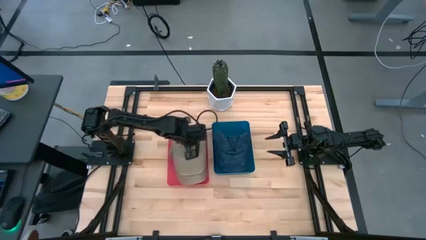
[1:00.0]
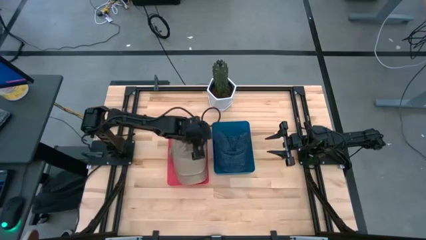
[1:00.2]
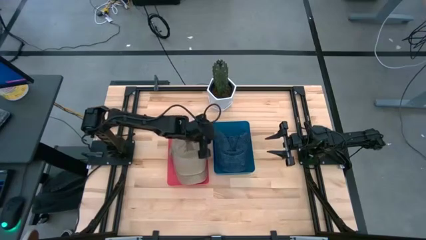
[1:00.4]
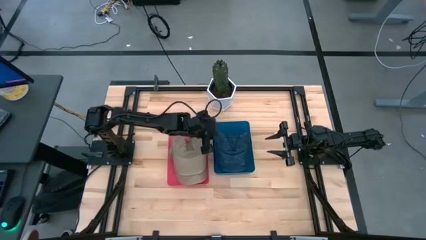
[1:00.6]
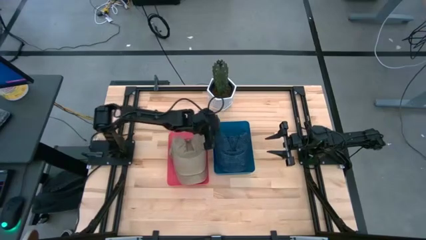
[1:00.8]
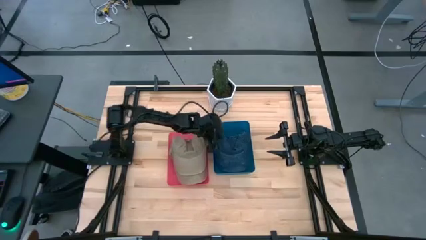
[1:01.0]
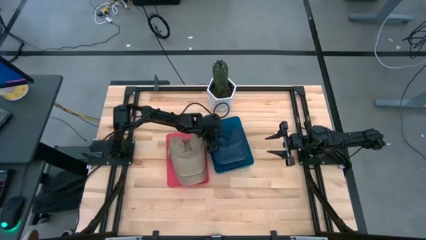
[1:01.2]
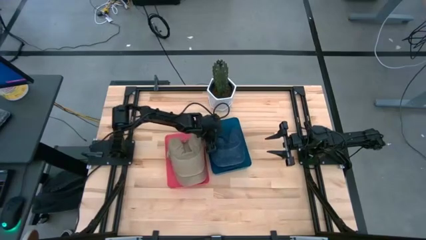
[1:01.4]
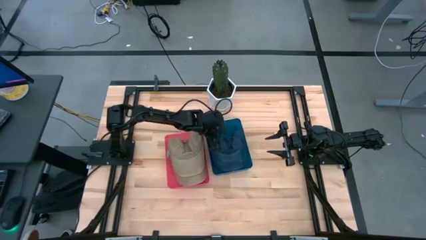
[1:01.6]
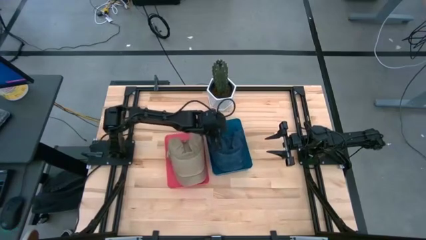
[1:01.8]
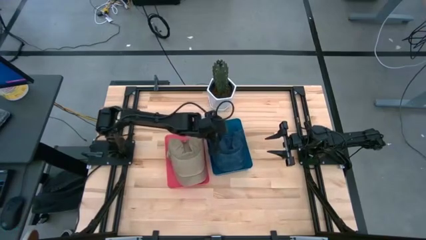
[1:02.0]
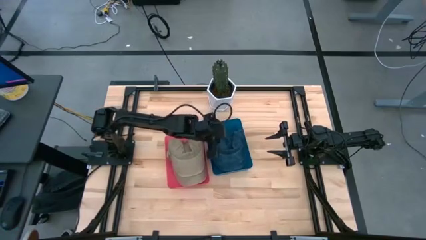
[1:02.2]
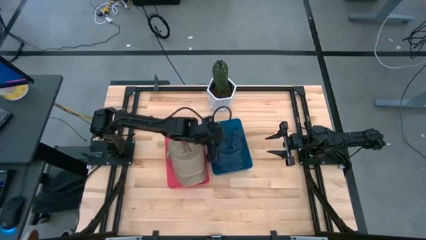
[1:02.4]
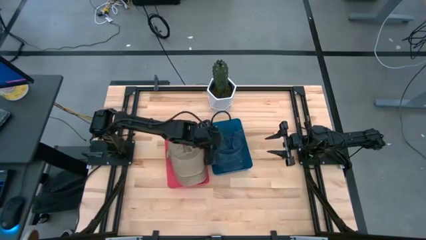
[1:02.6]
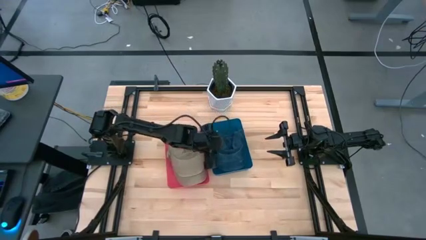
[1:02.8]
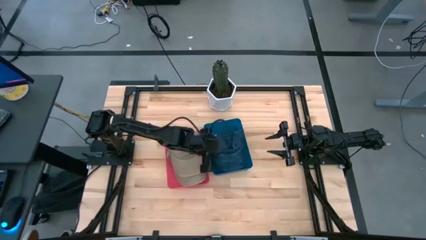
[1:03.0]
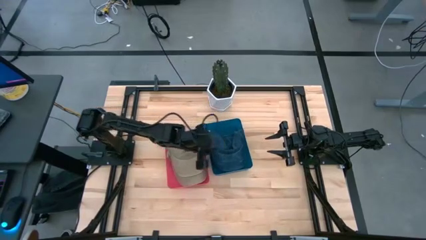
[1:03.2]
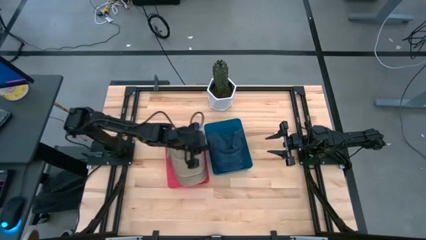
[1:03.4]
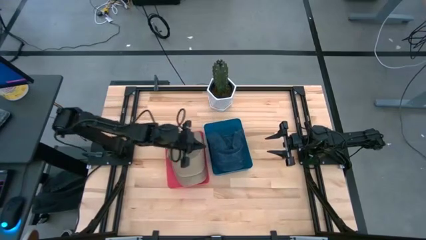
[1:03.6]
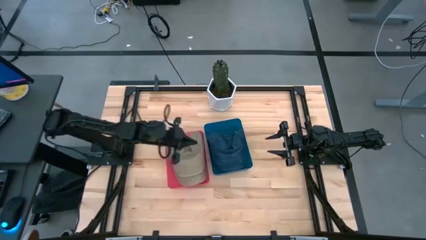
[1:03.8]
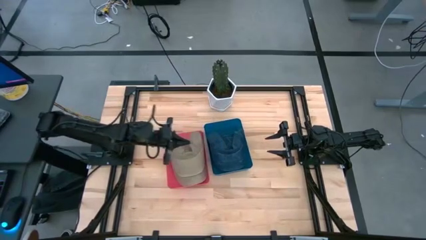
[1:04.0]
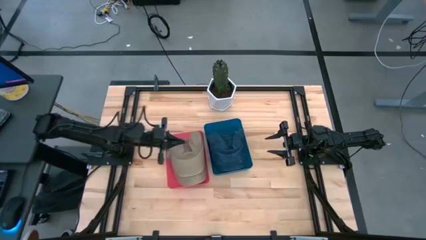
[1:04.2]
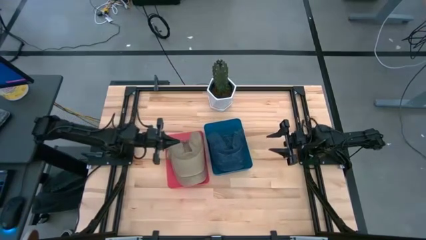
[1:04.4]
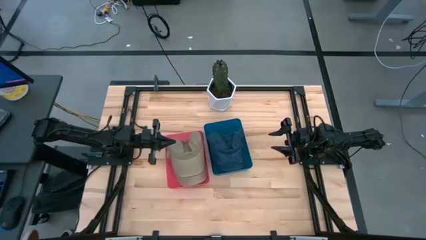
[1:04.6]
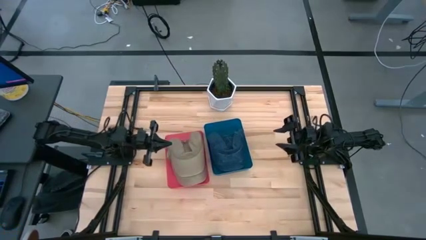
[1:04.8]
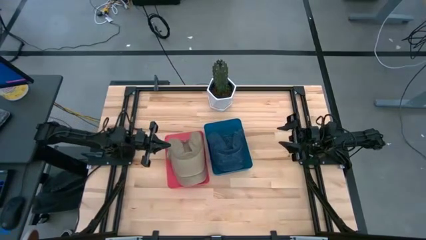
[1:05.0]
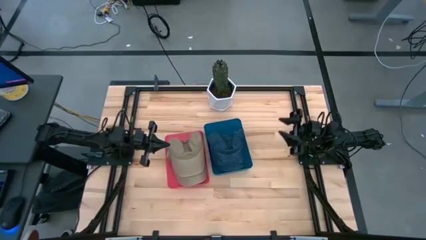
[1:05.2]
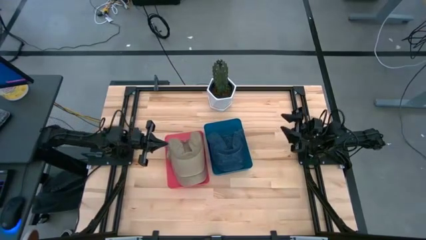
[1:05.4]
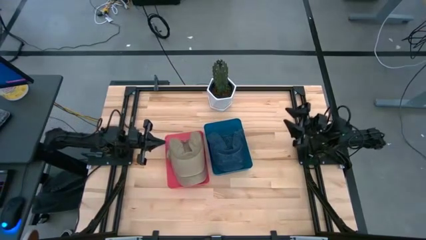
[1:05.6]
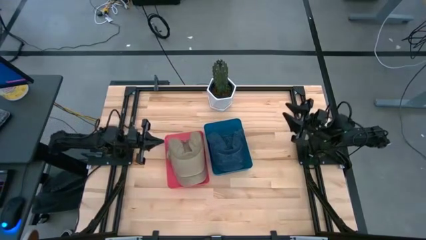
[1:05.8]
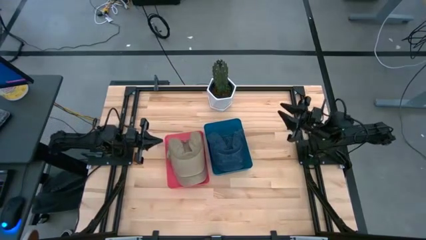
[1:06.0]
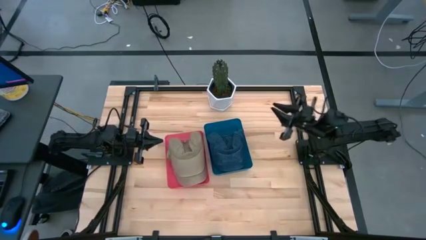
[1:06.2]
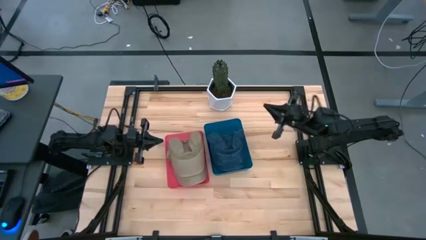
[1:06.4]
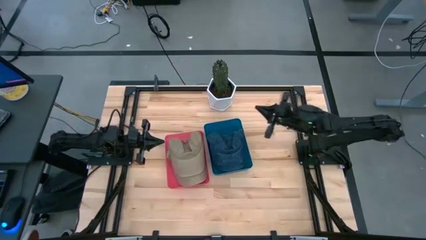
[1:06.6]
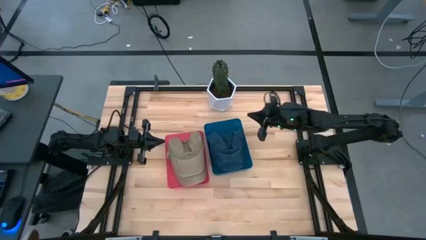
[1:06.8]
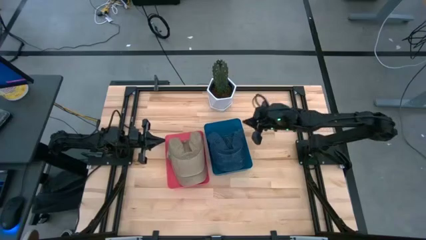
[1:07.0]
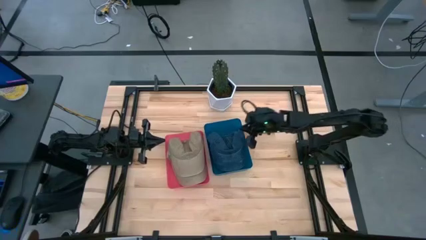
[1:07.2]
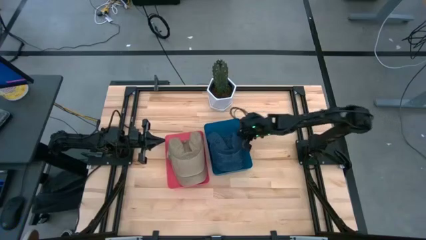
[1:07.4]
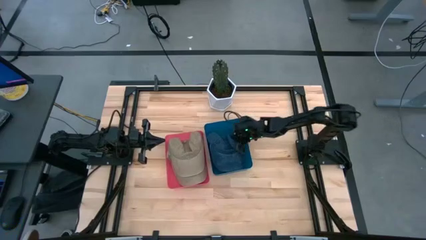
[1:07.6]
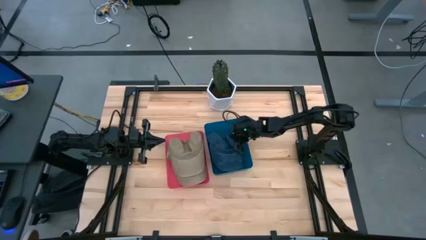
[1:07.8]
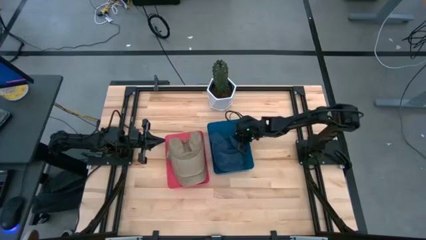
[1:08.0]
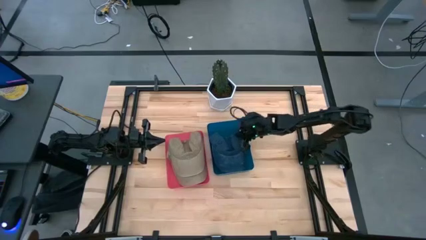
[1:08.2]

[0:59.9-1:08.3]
Task: Pick & Place hat
Adjust the blue cap in the blue bin

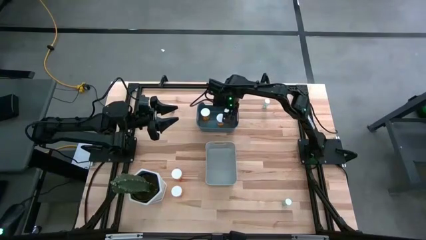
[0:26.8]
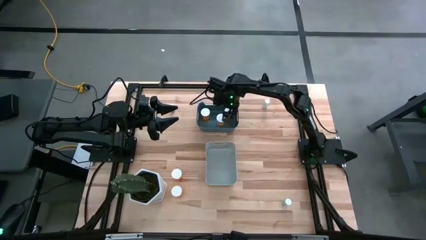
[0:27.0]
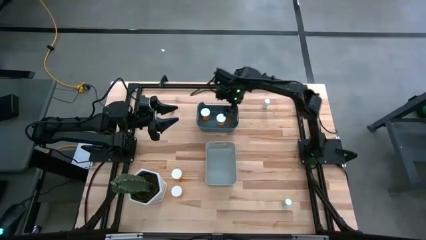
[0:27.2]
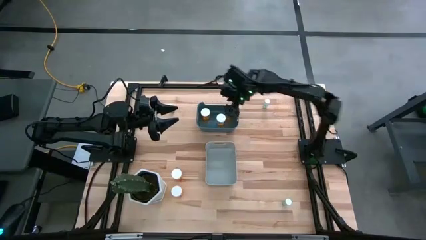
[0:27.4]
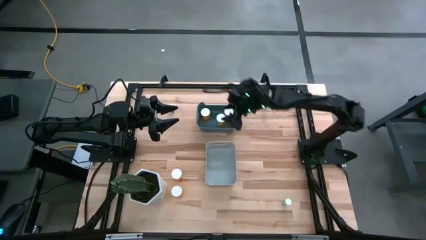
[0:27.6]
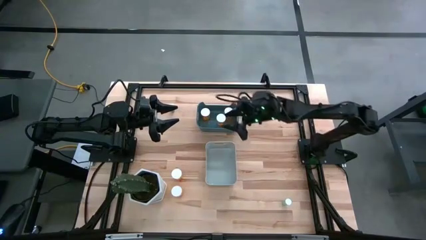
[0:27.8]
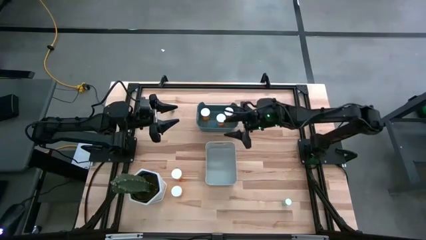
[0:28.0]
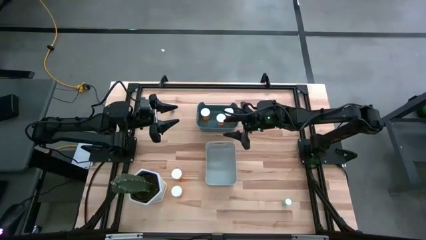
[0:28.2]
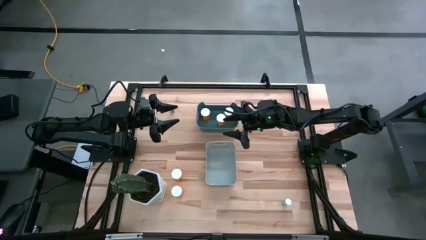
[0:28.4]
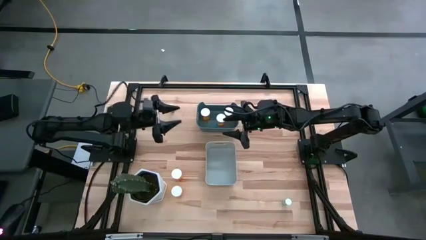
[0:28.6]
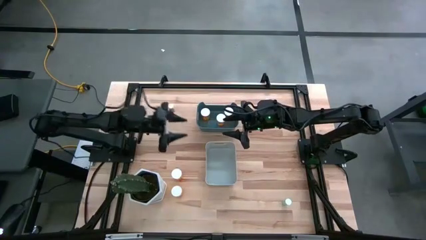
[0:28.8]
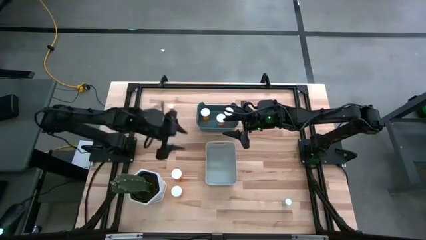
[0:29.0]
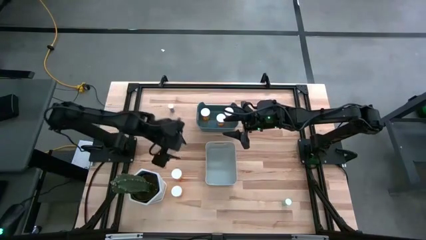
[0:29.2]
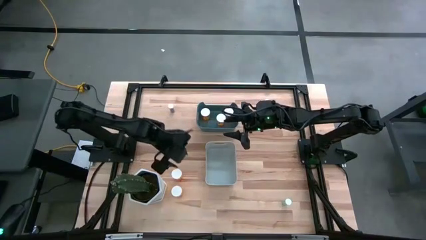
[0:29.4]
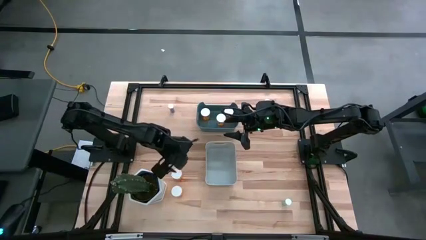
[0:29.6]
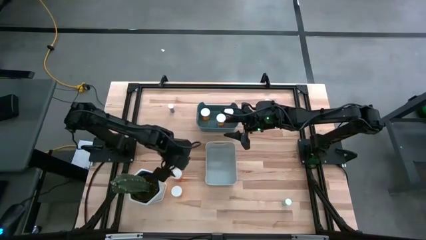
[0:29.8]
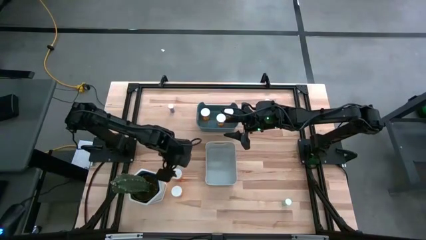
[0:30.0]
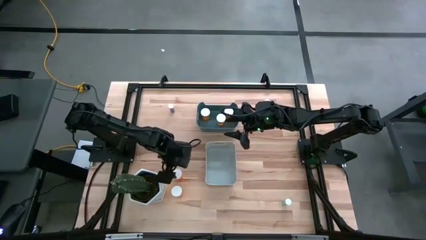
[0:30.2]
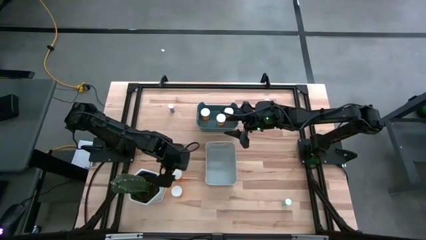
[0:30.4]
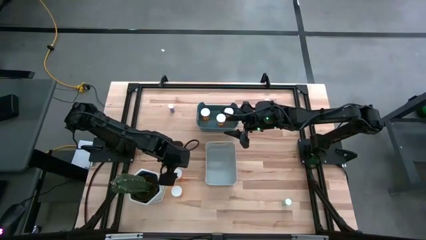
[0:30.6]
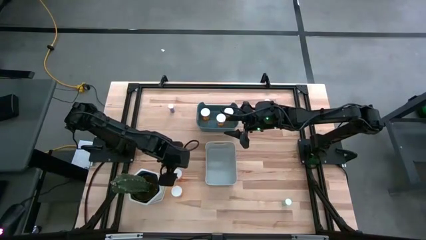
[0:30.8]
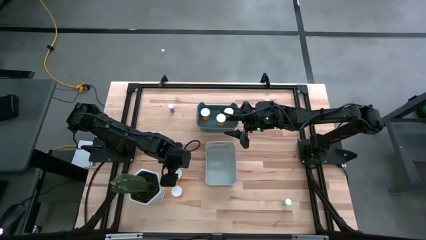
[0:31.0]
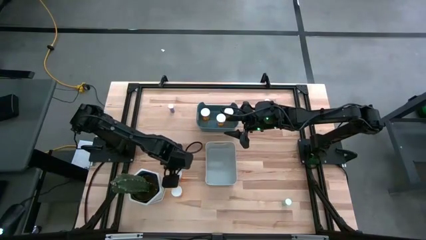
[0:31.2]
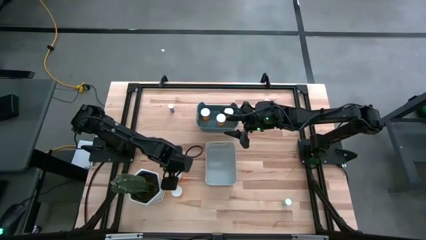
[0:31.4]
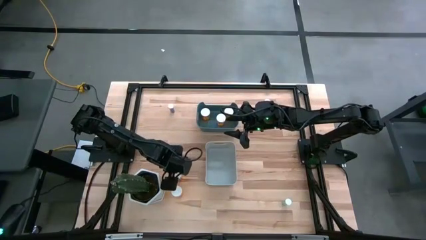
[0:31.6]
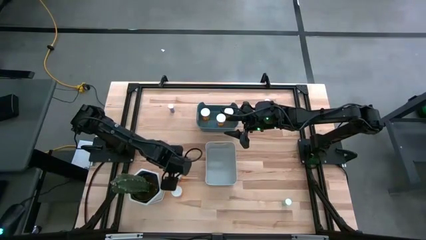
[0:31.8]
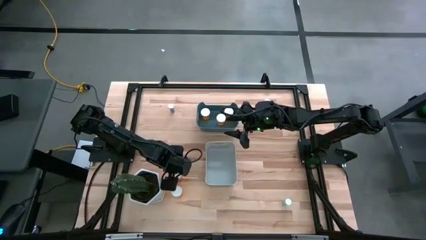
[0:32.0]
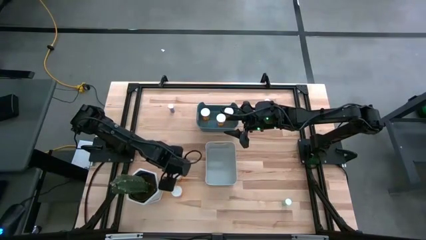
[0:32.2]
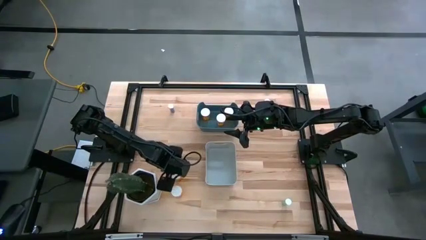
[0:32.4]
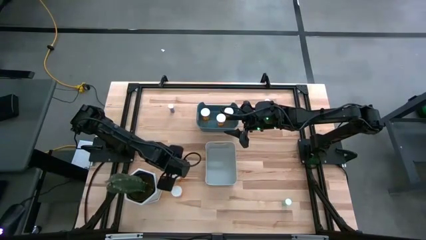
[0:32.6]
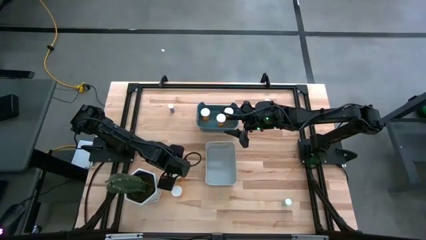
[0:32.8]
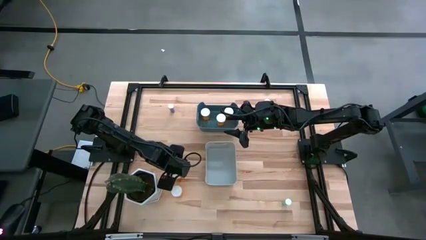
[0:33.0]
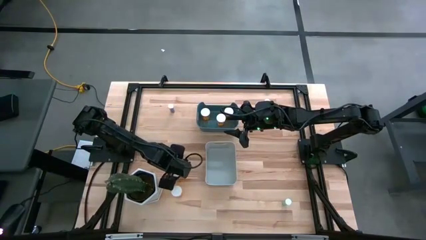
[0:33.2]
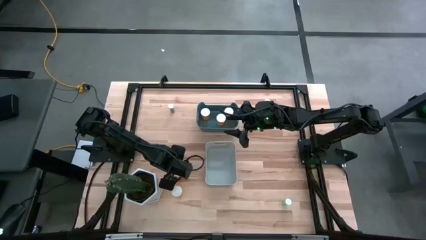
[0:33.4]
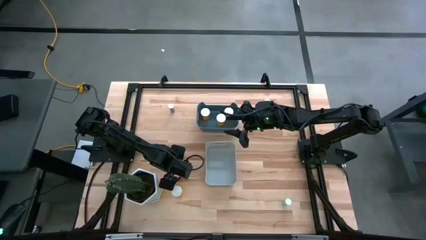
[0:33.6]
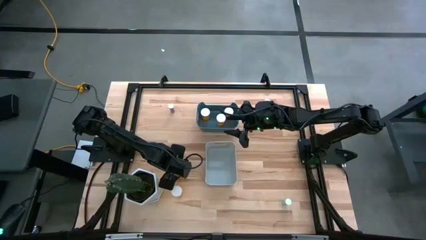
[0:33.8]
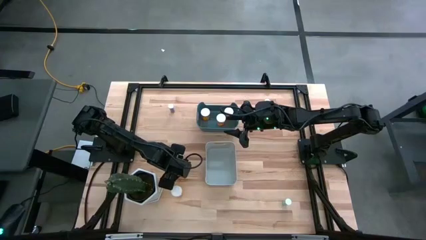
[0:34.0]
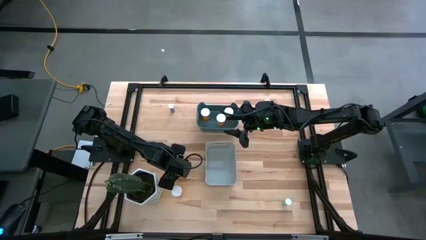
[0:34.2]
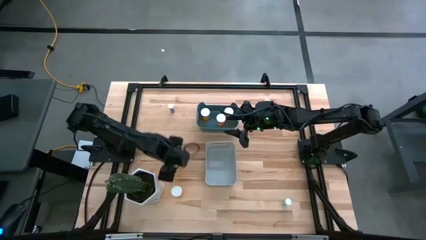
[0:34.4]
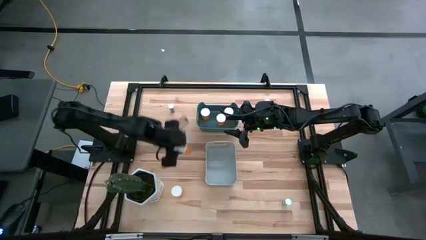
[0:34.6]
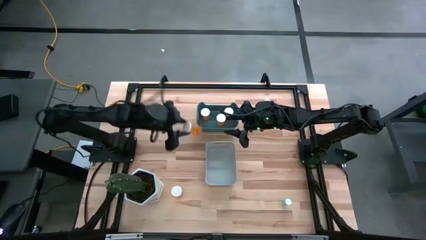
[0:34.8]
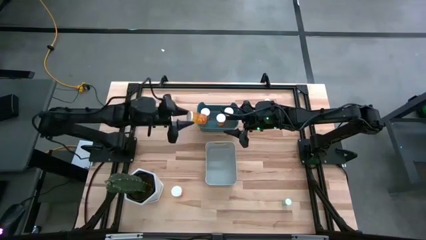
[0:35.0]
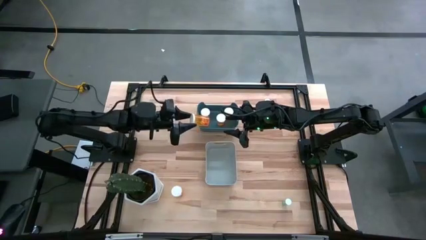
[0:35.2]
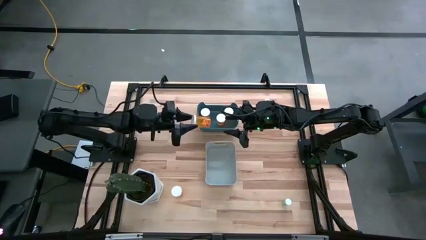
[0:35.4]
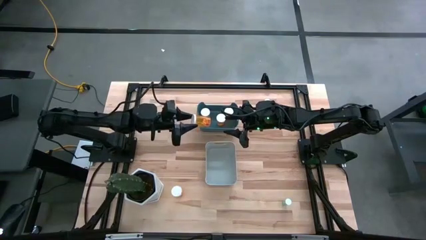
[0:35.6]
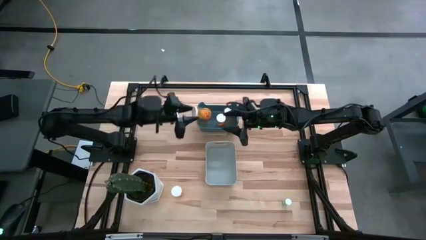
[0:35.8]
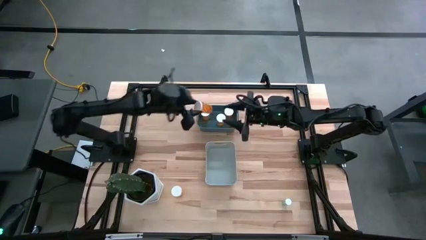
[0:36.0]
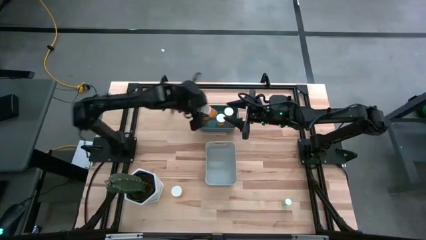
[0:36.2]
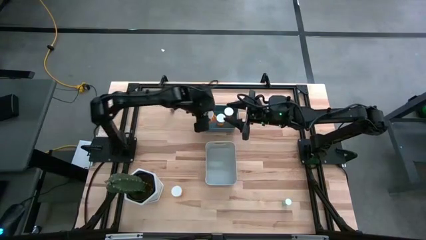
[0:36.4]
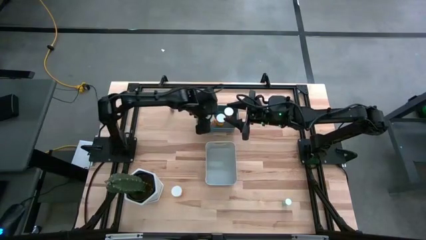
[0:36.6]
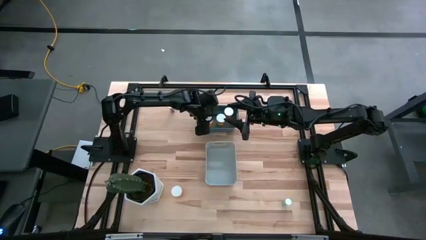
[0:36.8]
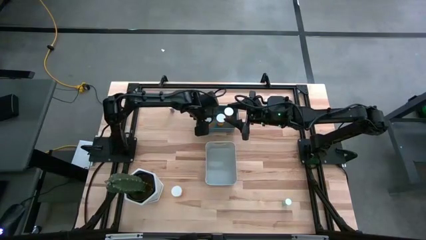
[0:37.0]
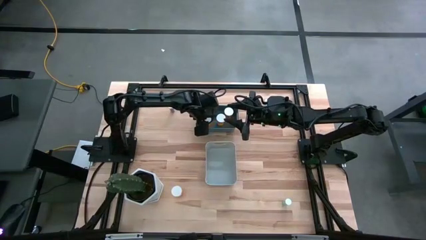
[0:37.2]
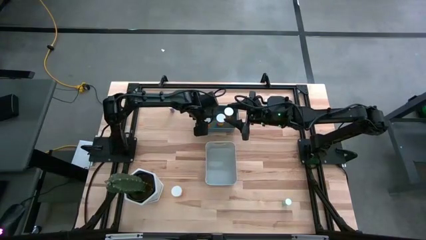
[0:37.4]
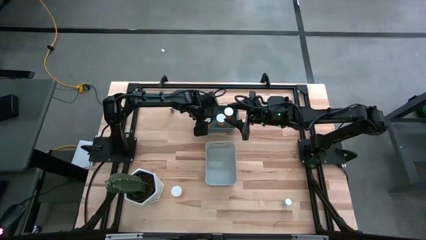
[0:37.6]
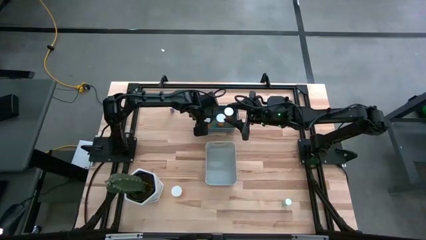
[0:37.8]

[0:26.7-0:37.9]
Task: Pick and place medicine bottles into bin by pill shape (circle, oval)
Put the orange capsule bottle into the blue bin
